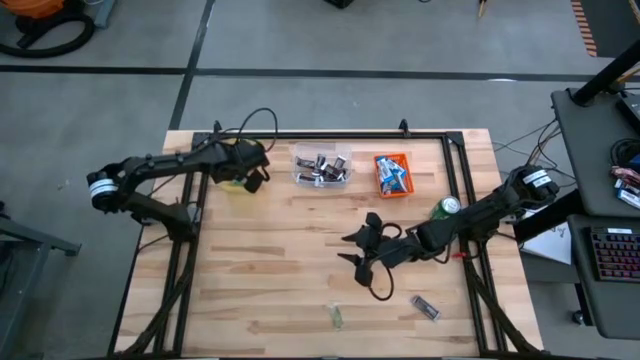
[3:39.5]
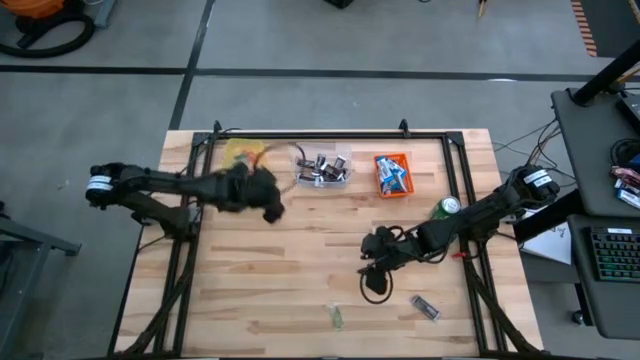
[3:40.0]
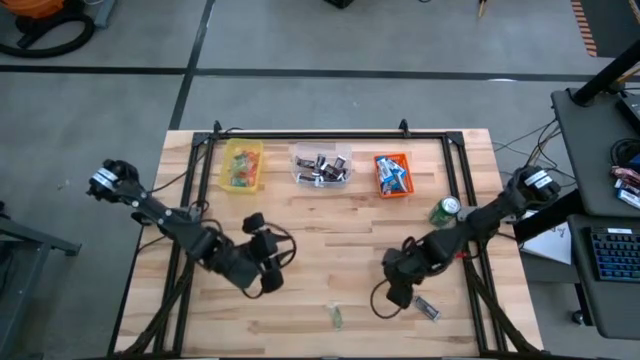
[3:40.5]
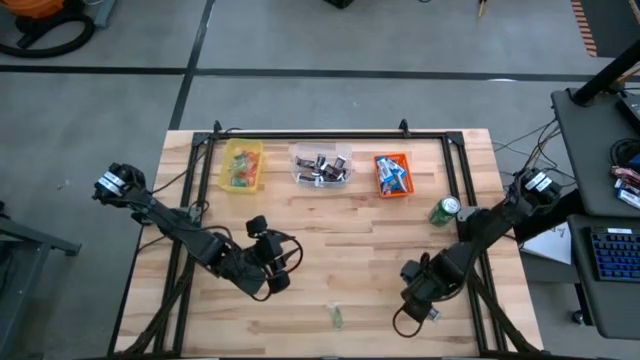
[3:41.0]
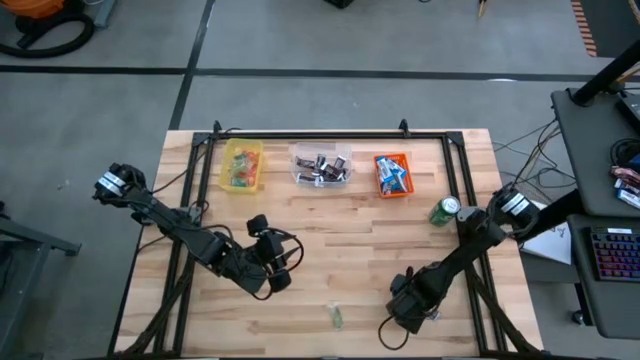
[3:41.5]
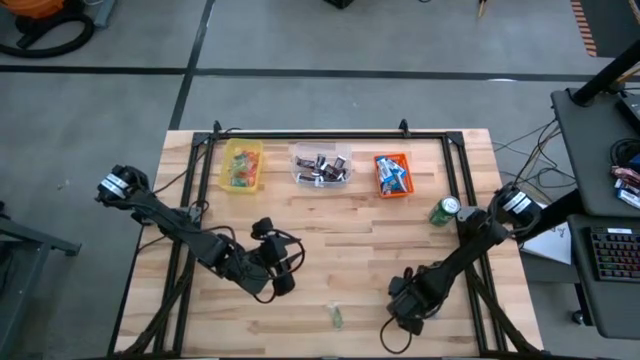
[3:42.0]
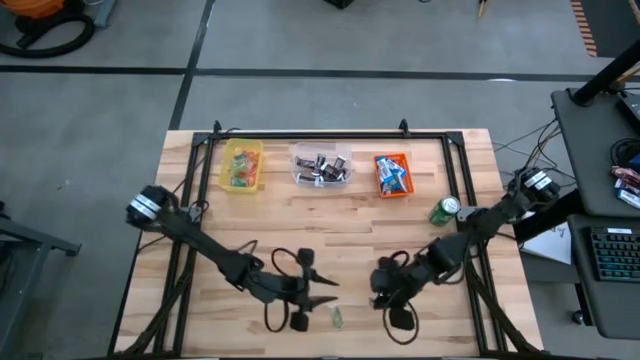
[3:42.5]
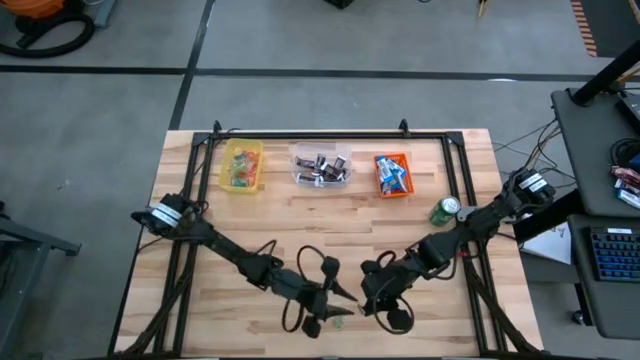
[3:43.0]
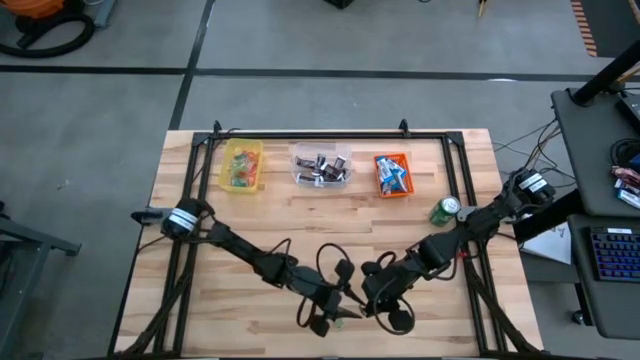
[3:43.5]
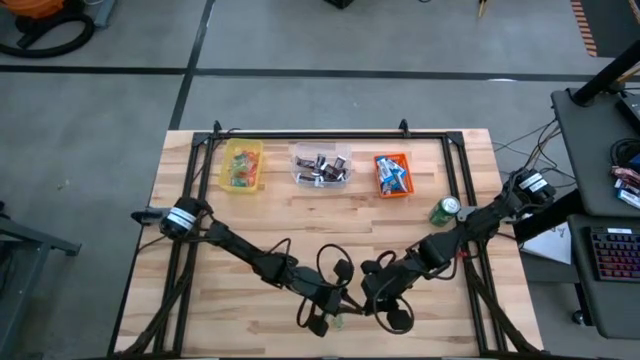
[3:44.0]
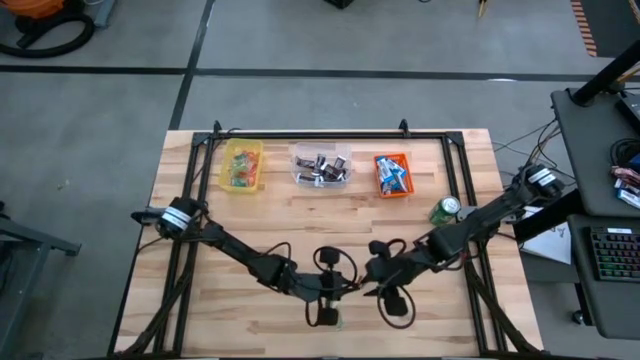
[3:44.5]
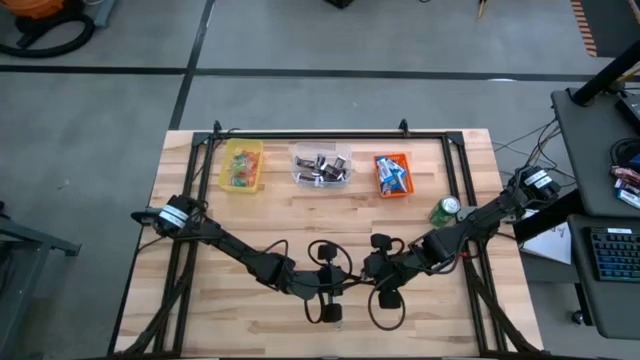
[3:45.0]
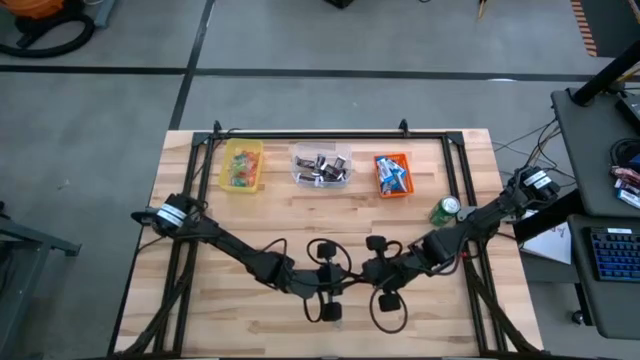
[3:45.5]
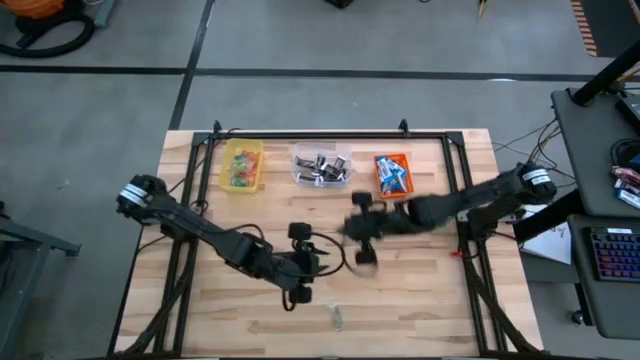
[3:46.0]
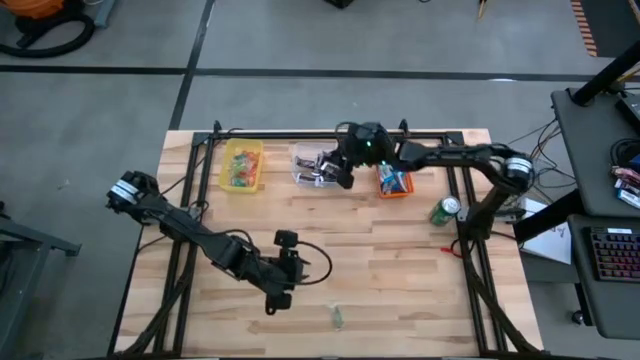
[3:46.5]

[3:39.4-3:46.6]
Task: Organize candy in baskets
Put the brown chocolate bar into the transparent bin

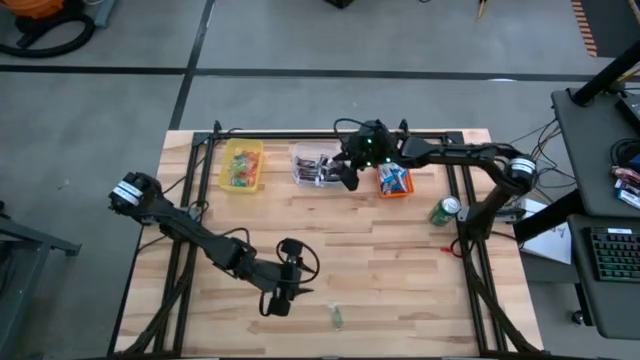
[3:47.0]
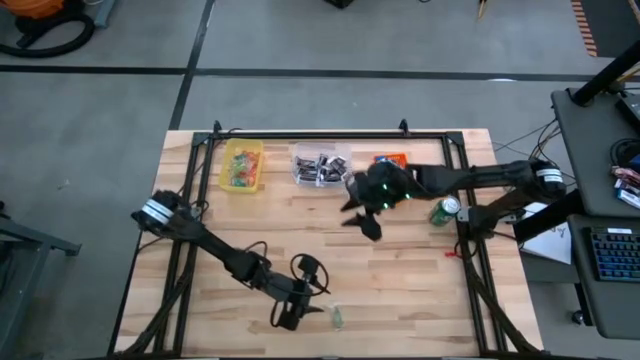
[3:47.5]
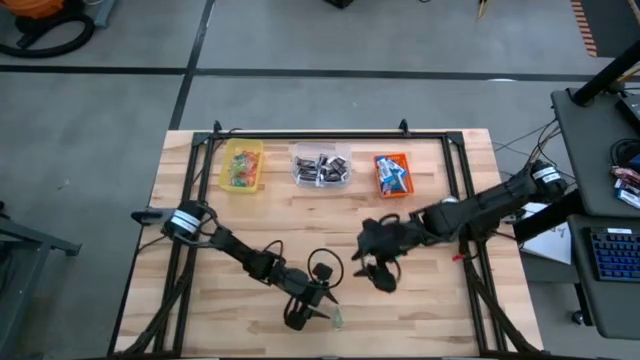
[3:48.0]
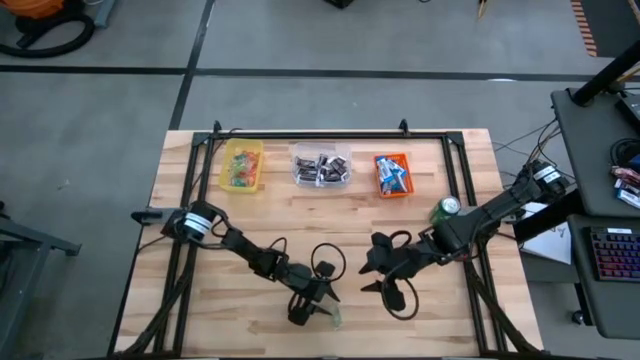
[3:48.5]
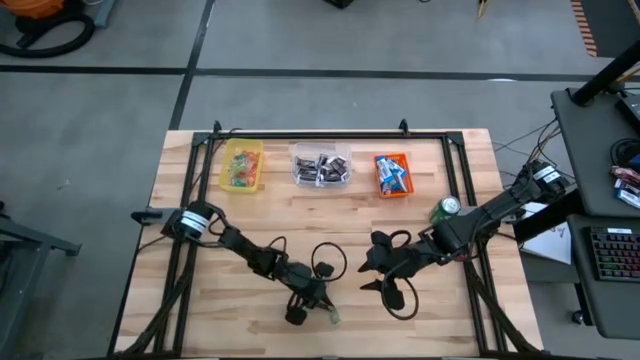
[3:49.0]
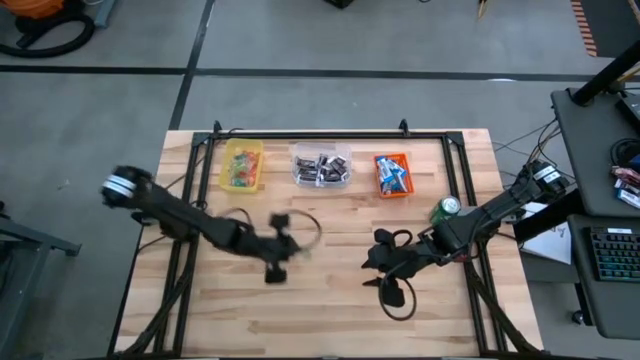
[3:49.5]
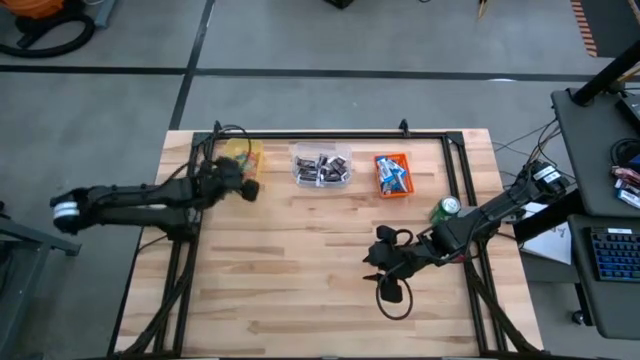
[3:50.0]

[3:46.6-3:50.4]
Put the green gummy into the yellow bin

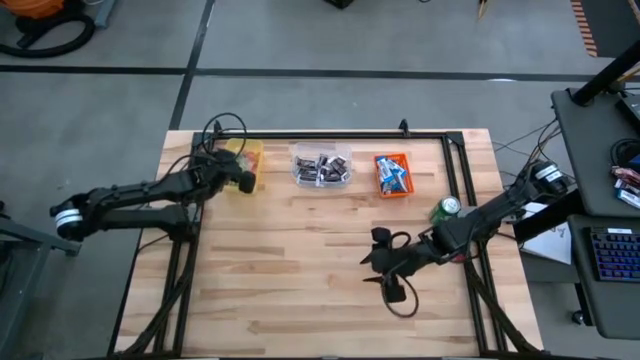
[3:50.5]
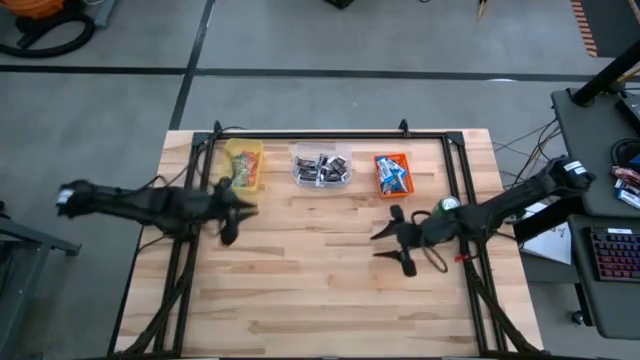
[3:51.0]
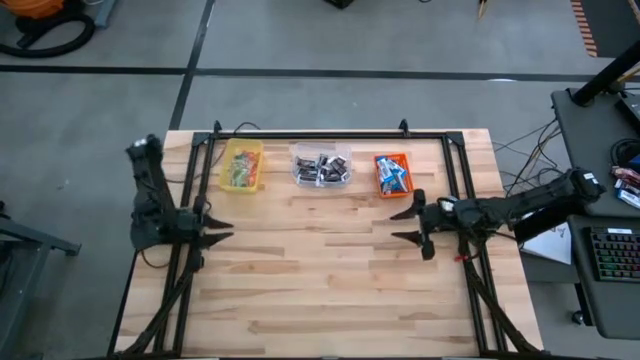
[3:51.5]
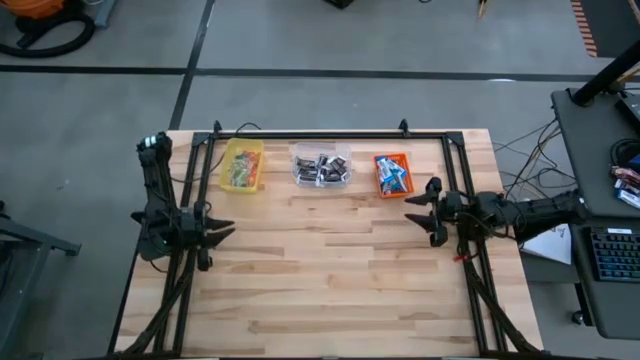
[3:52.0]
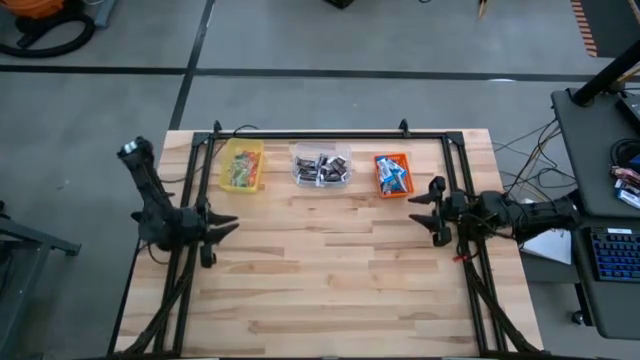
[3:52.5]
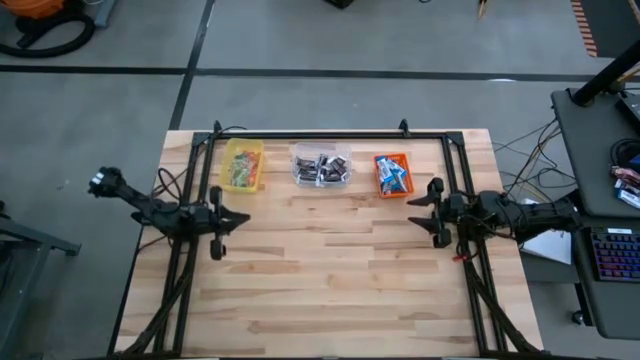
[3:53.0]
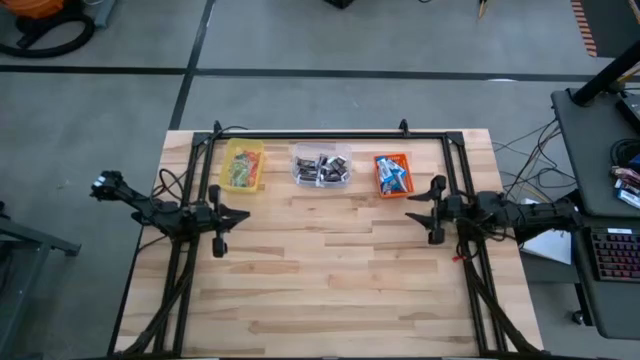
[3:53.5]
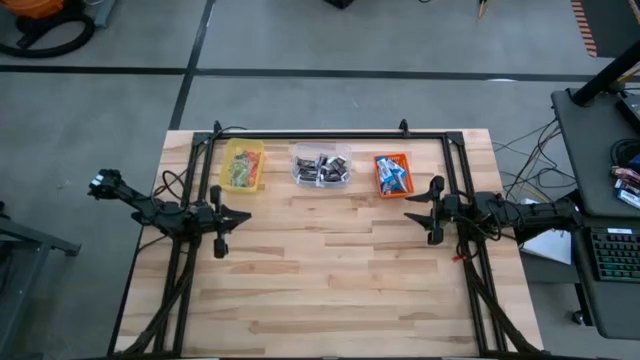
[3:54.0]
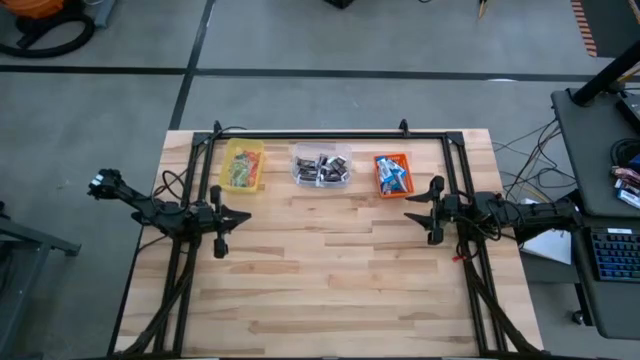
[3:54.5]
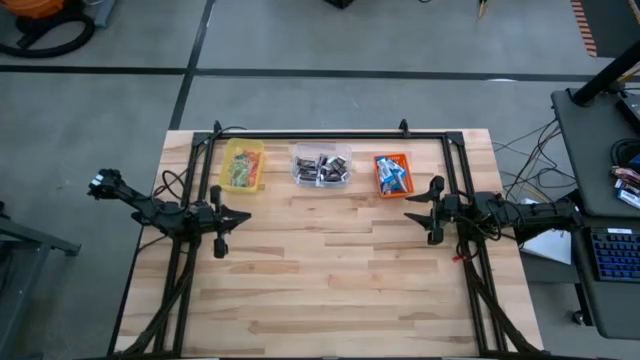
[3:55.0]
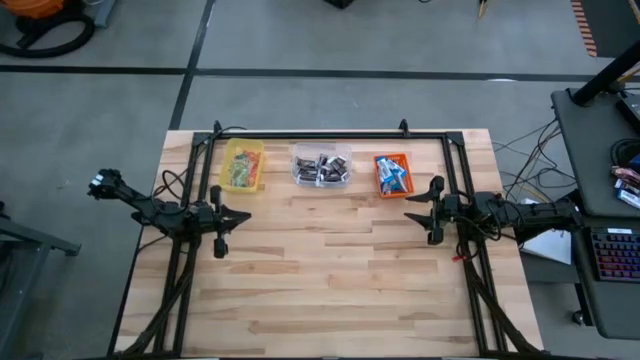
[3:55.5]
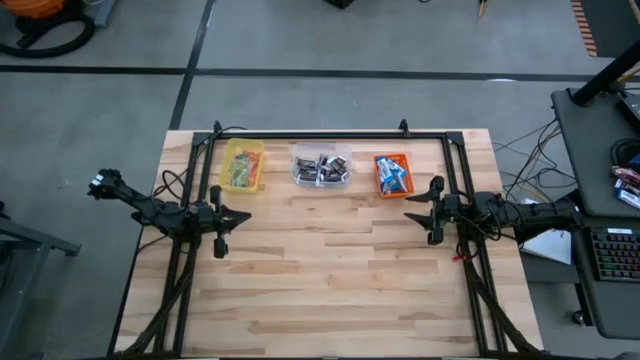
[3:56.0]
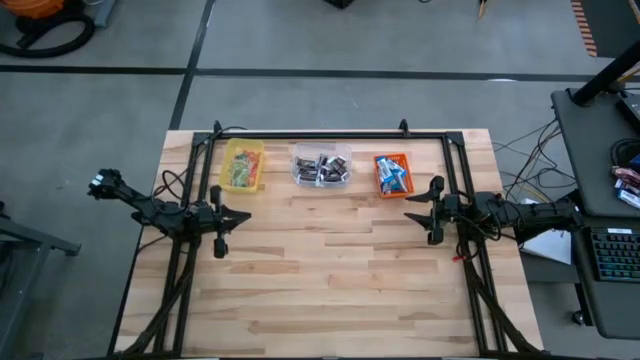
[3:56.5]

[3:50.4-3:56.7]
Return to Home Position

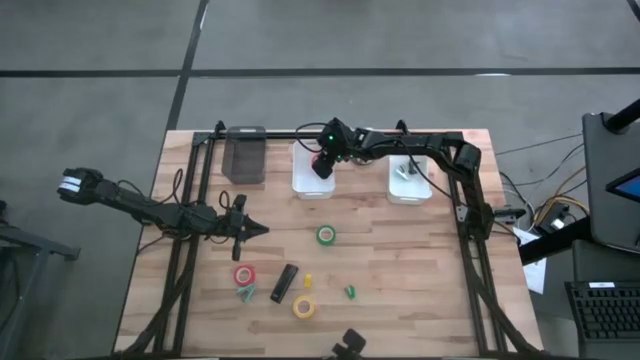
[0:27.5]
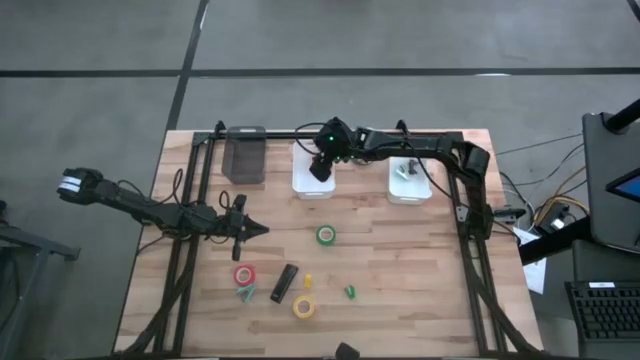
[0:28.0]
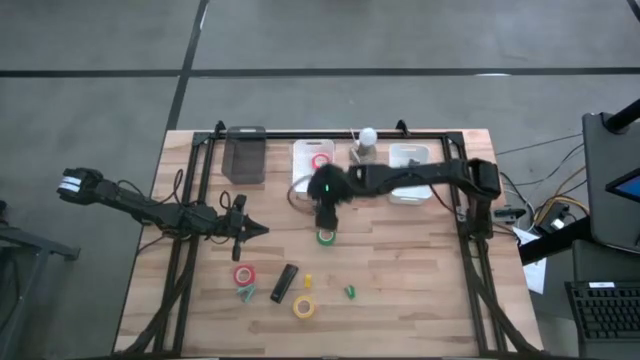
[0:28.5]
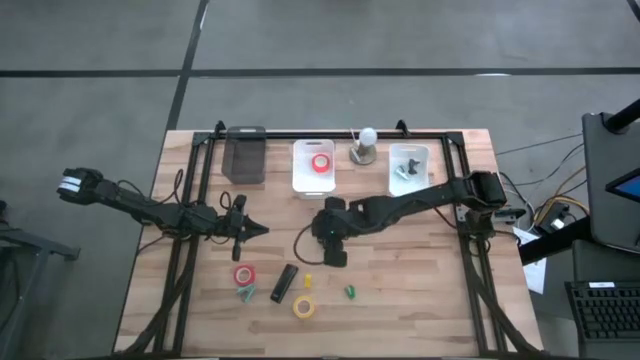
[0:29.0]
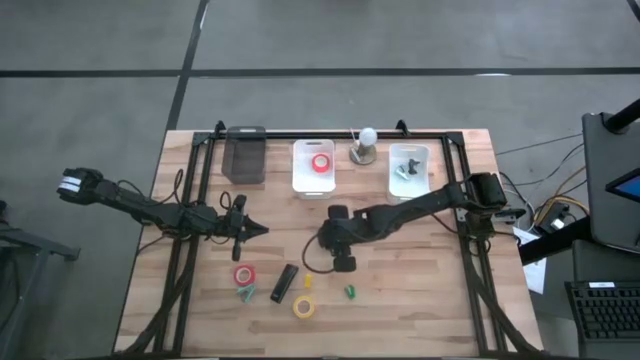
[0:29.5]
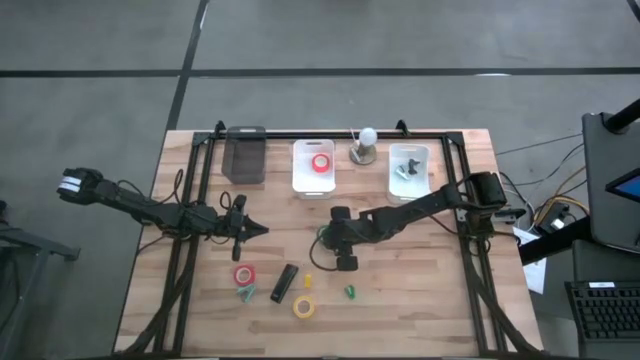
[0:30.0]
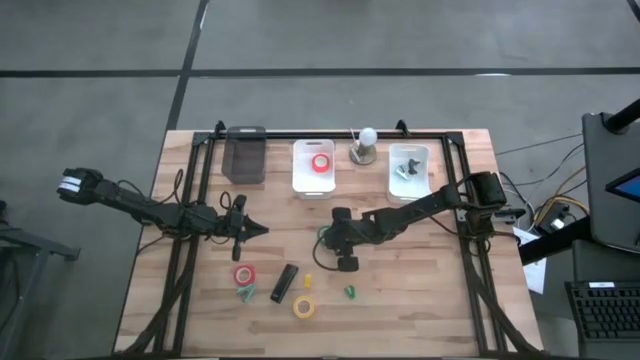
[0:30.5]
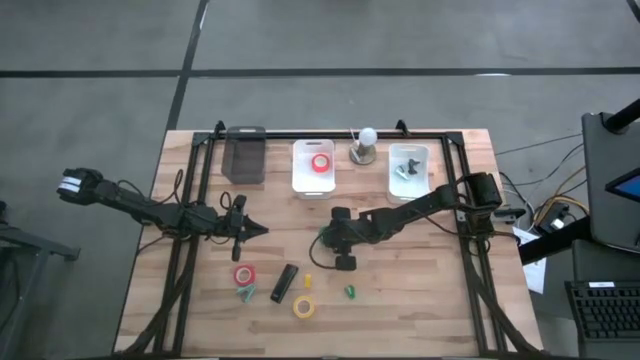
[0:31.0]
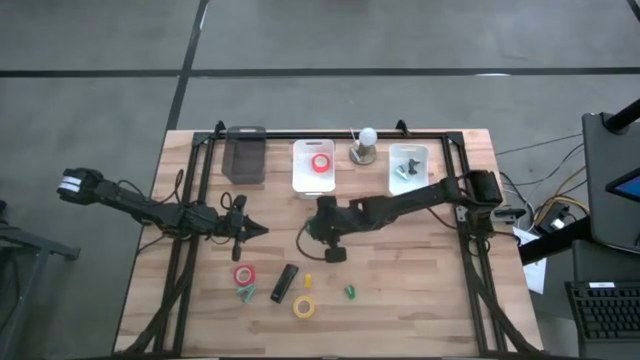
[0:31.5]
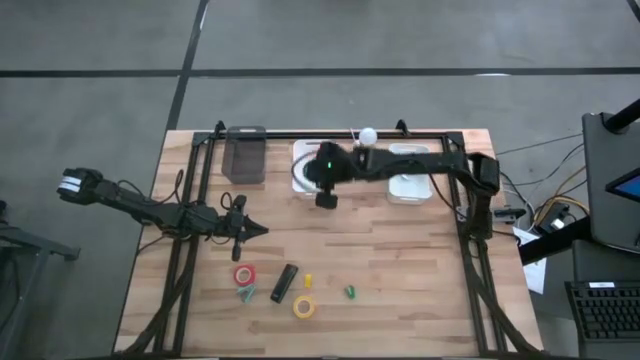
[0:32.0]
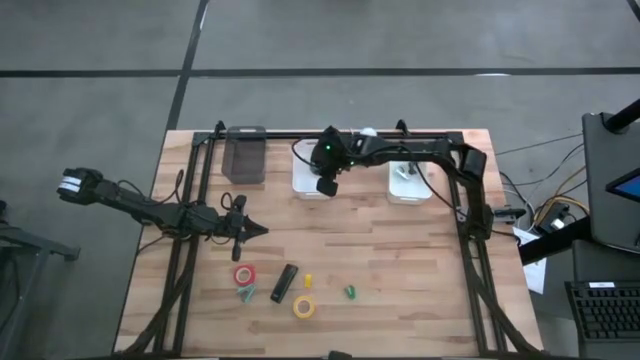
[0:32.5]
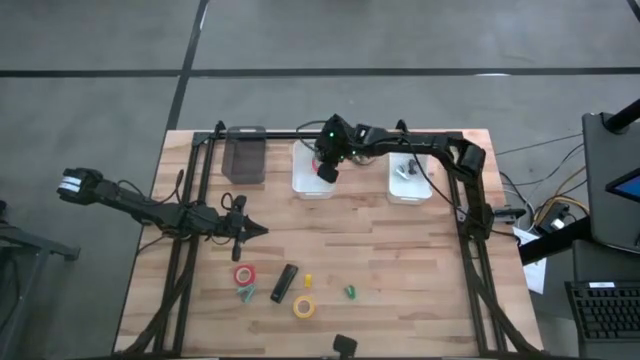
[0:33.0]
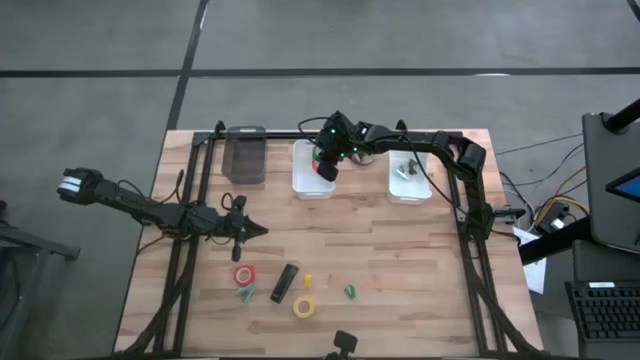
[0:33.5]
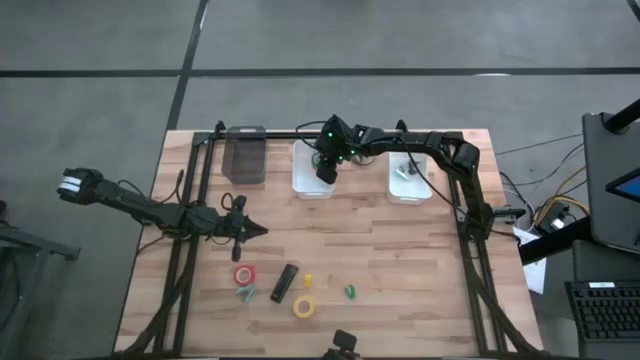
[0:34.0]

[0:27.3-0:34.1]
Task: Pick and place Stapler, Stapler remover, tape
Put the green tape into the left white bin
